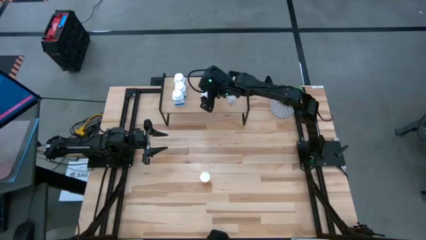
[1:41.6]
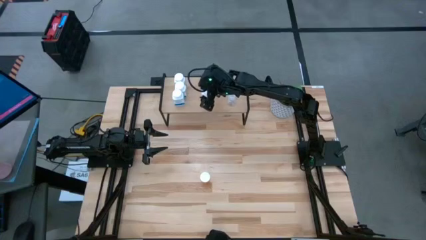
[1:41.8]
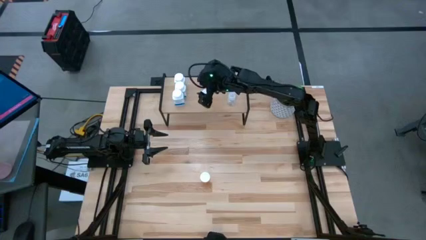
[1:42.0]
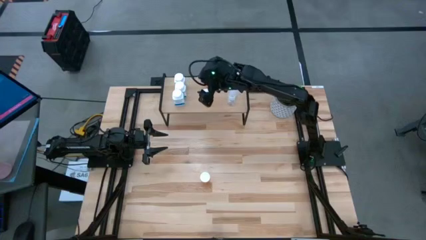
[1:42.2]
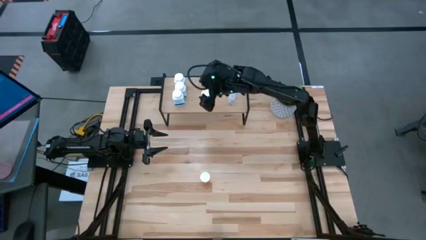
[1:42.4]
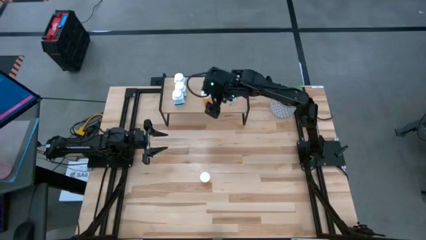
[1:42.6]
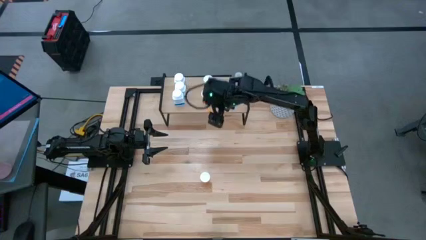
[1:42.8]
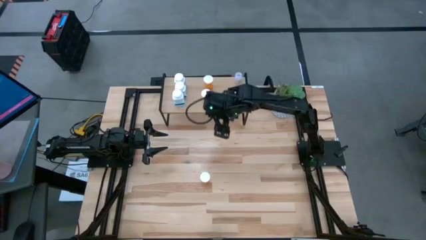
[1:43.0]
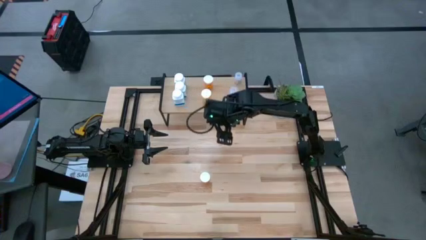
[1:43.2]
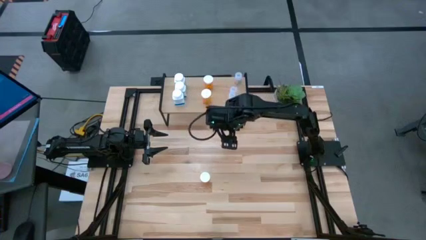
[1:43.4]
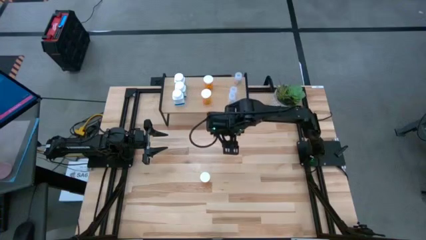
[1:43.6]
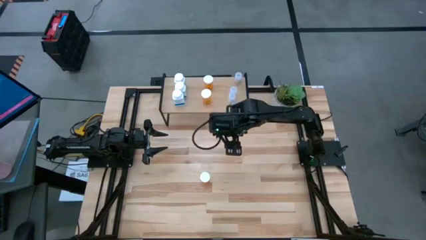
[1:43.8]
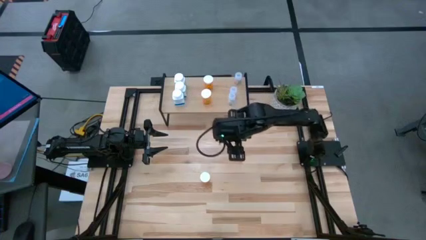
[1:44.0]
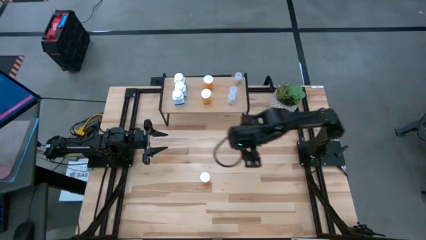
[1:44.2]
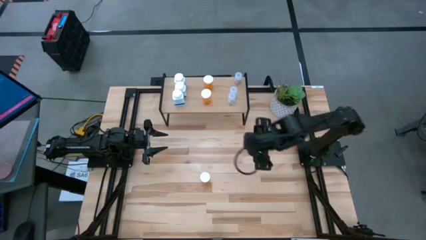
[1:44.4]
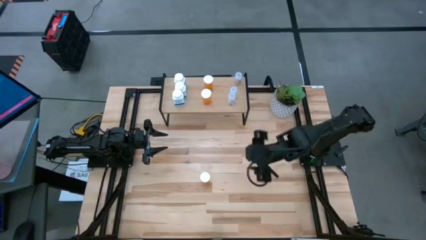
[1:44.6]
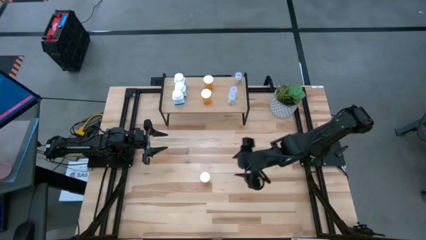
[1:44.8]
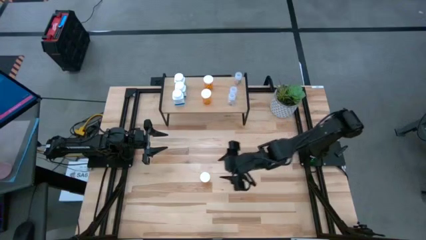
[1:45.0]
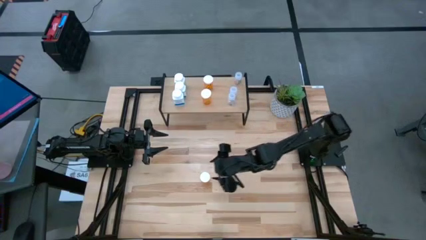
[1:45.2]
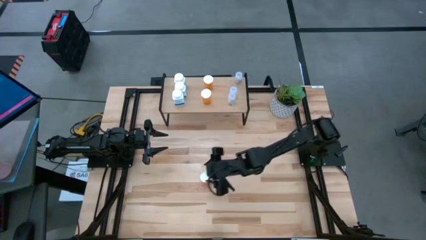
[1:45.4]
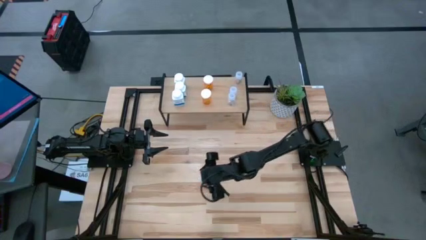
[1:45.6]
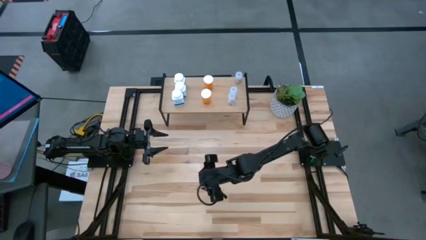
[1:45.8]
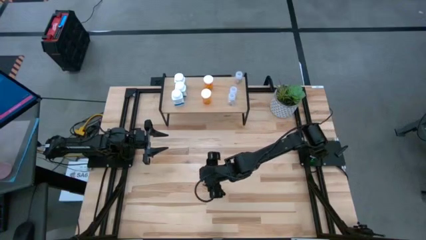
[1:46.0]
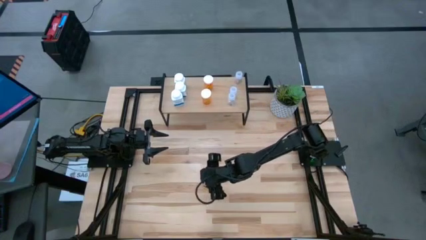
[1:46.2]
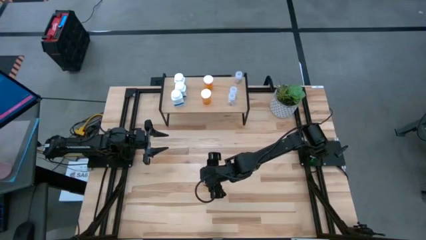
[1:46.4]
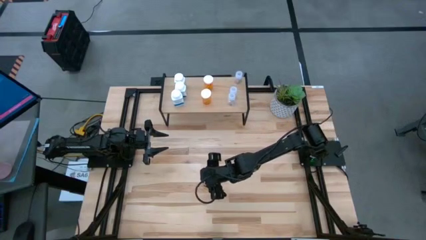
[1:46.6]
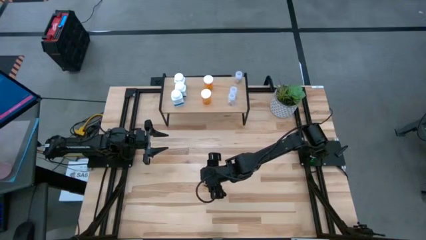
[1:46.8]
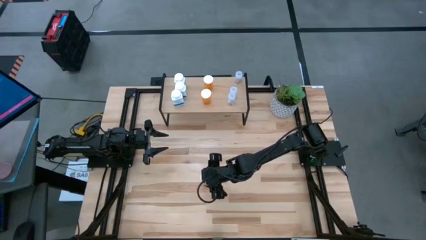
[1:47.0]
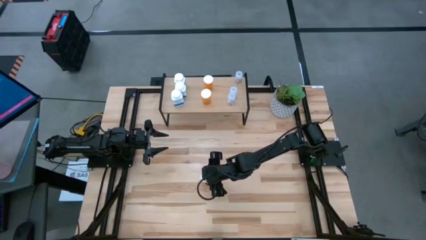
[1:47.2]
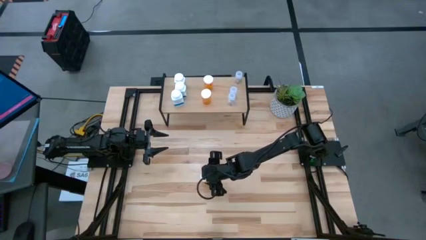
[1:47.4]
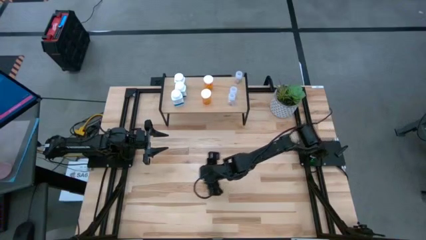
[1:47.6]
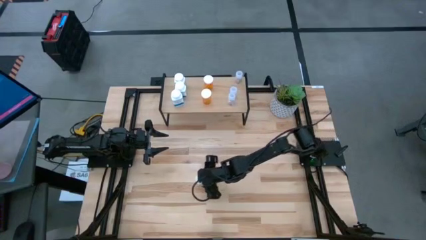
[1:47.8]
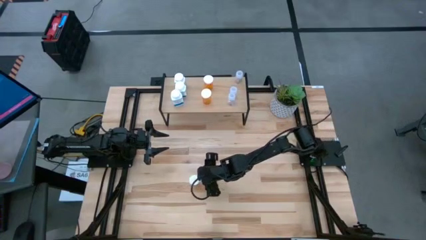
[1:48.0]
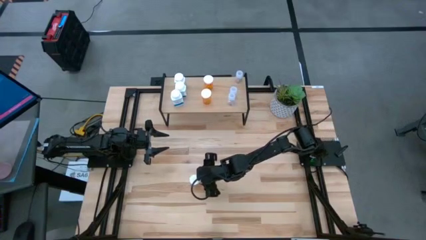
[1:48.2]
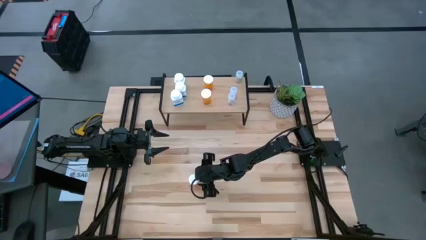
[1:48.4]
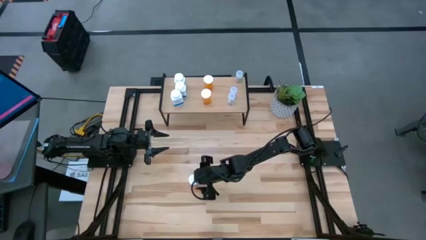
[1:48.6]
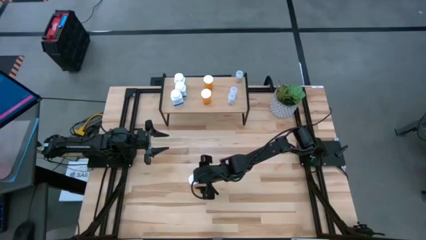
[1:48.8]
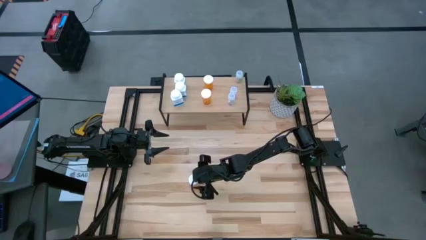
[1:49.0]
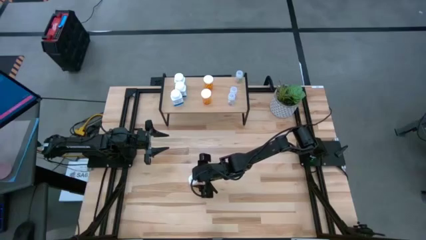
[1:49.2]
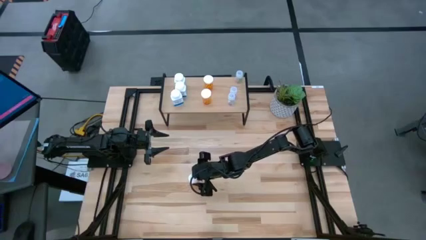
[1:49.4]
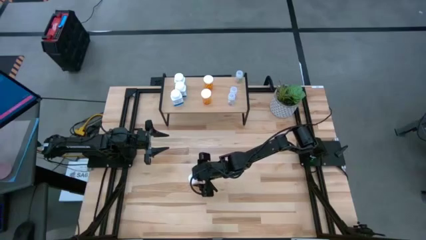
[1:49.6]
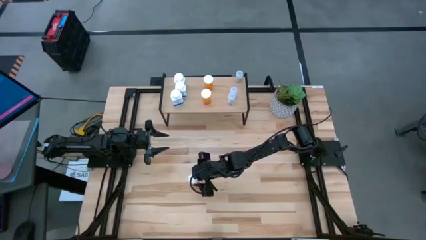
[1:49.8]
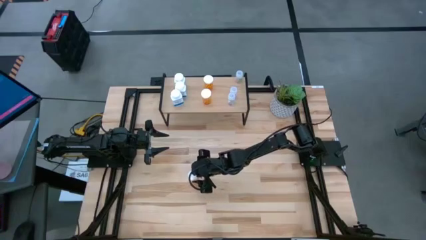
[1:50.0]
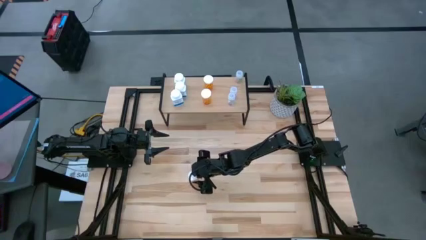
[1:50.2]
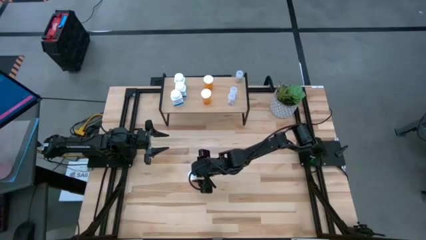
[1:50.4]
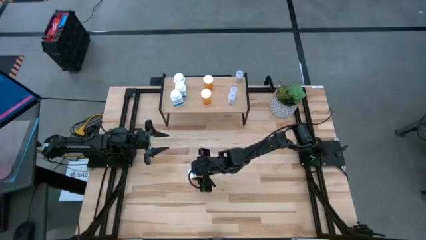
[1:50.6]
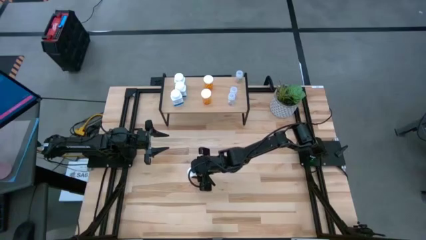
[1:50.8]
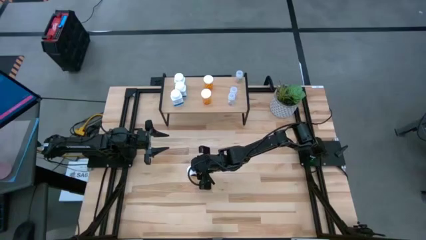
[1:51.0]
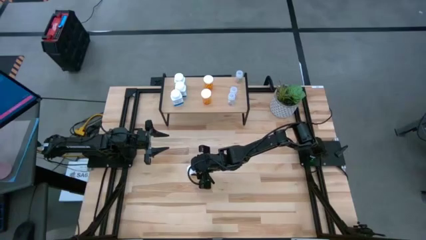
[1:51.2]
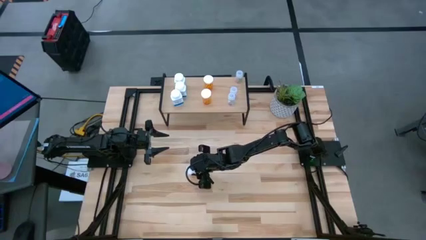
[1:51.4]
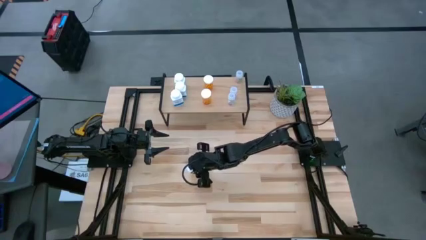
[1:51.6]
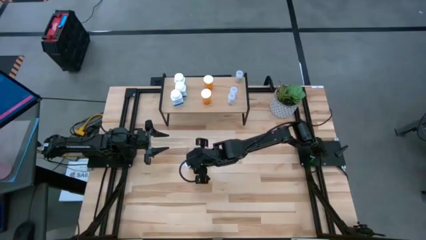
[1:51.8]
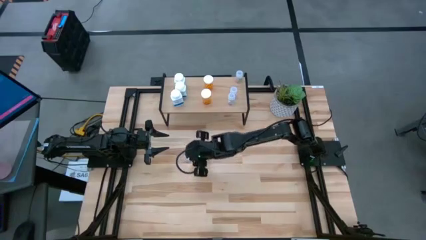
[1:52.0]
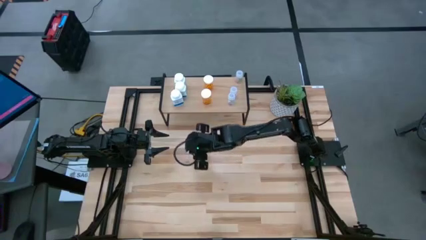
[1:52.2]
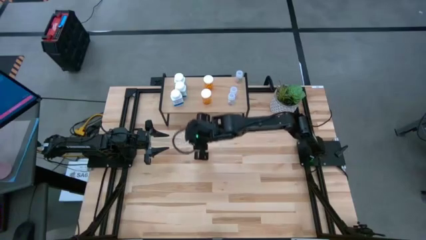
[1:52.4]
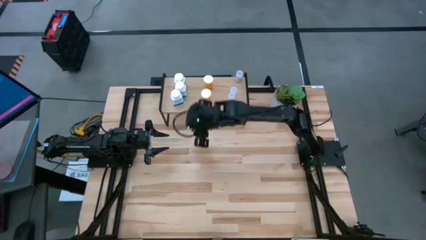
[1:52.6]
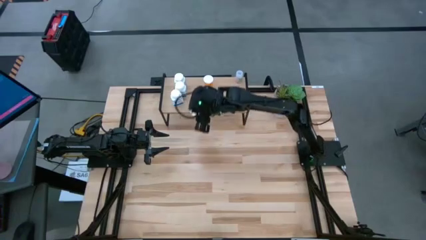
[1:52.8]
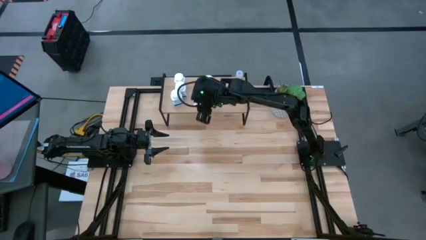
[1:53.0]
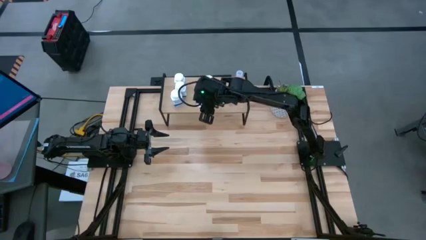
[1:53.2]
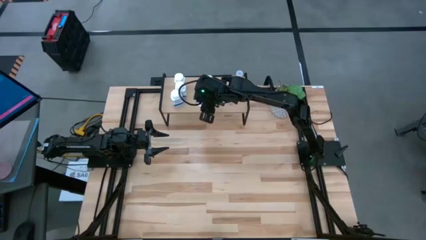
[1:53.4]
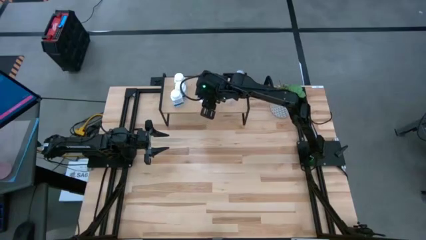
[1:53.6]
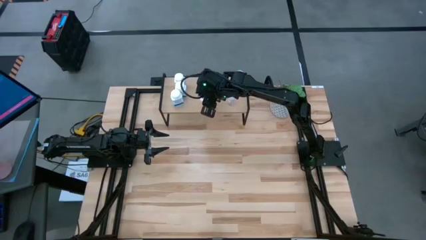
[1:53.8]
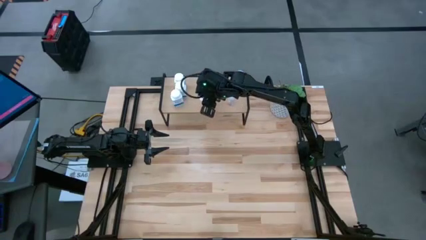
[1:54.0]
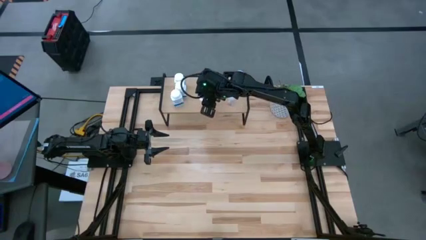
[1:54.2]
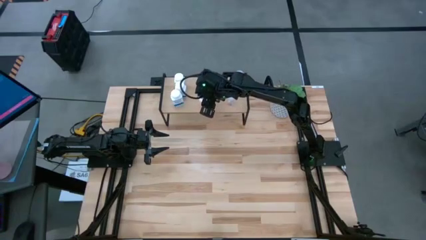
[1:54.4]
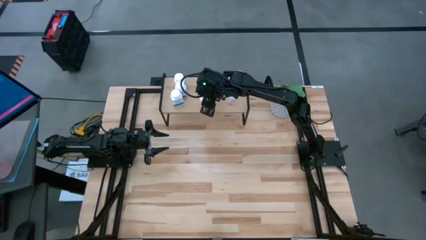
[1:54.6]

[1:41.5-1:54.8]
Task: Pick and place medicine bottles onto shelf by color
Put the orange pill bottle aligned with the other orange pill bottle on the shelf

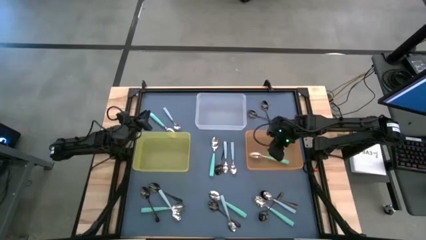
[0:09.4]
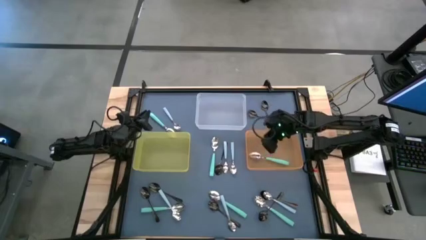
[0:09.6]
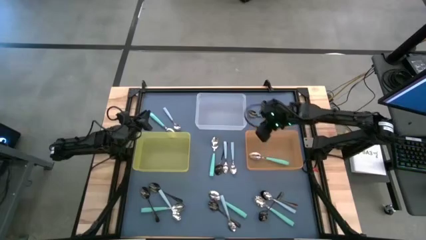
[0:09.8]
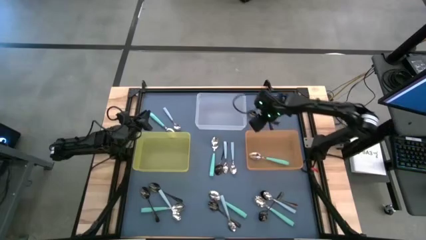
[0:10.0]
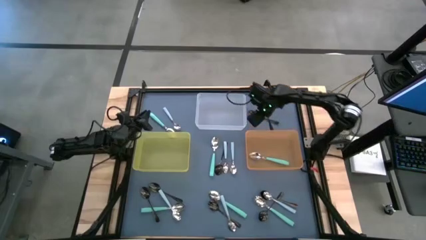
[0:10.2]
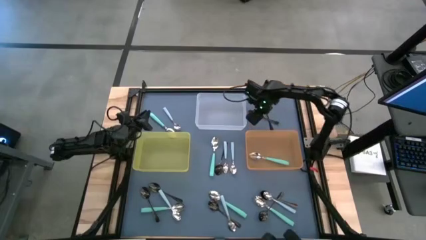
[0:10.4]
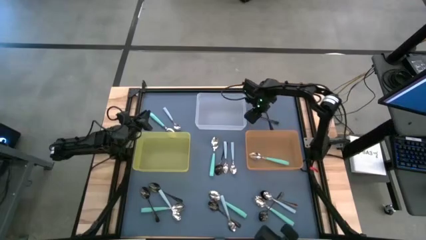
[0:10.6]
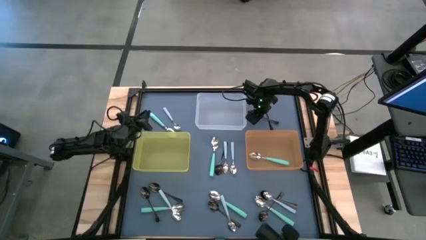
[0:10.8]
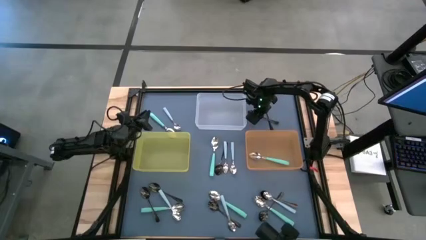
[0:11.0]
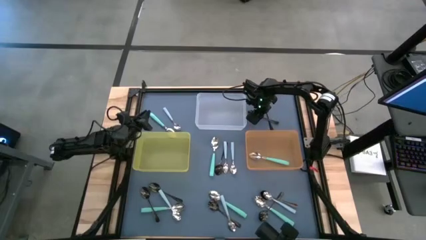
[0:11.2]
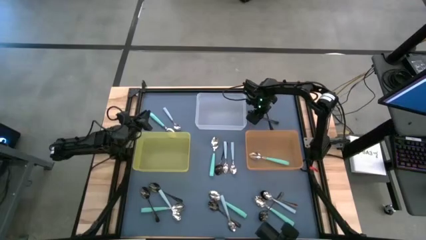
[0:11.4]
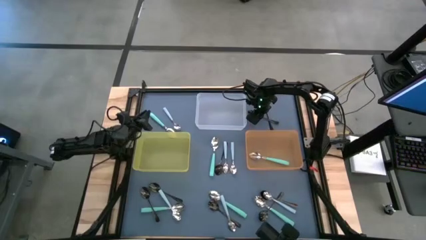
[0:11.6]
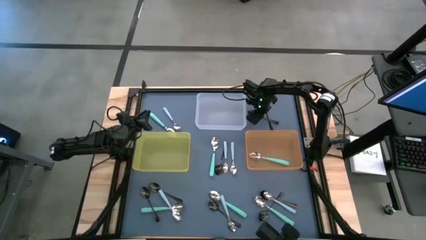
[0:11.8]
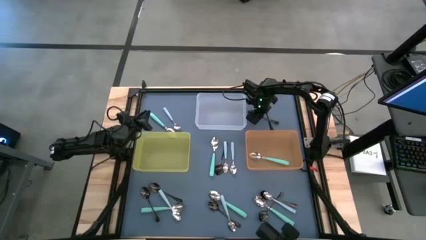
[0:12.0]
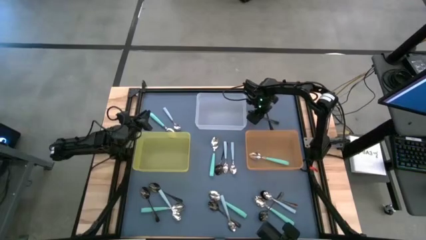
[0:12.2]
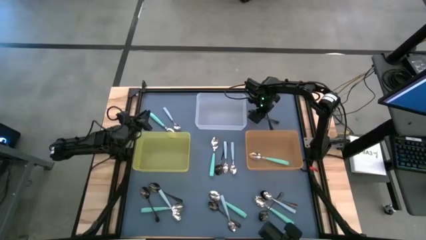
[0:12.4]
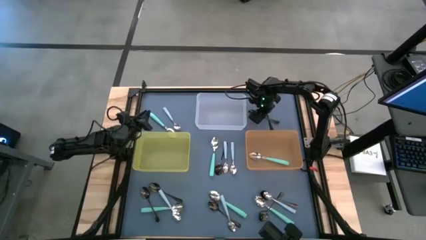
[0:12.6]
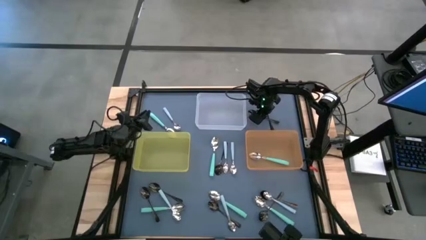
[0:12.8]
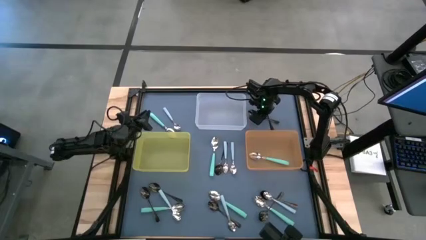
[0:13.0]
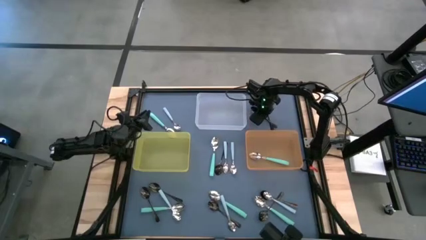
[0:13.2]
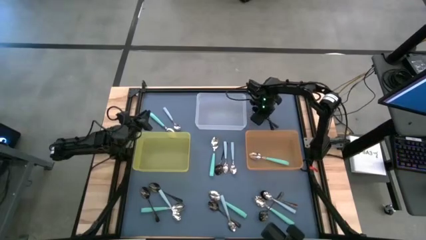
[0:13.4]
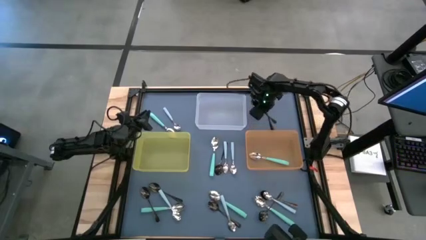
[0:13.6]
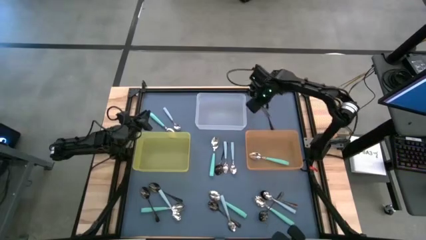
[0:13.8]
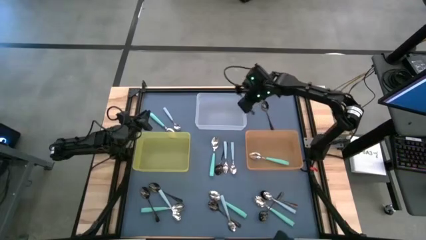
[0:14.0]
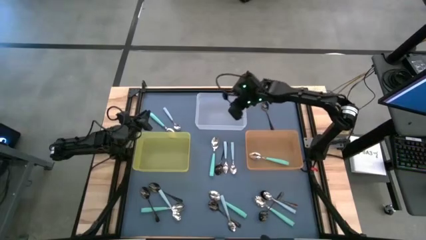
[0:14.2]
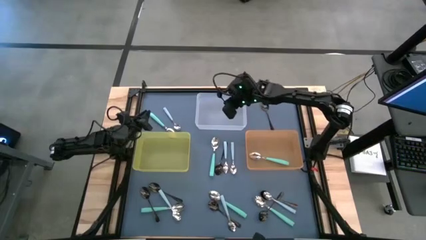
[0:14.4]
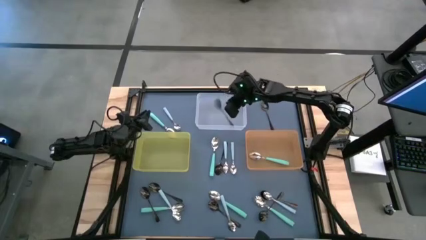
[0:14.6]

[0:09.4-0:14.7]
Task: Sort silverware by color (type)
Put the black spoon into the transparent bin
